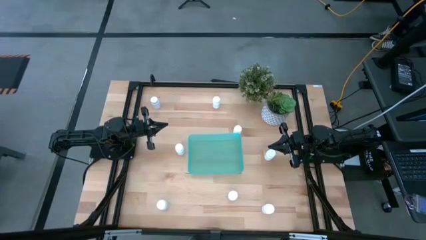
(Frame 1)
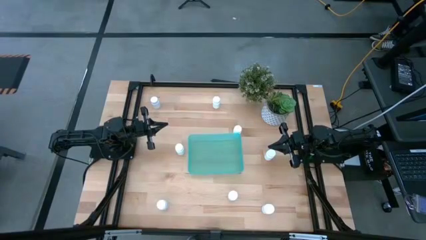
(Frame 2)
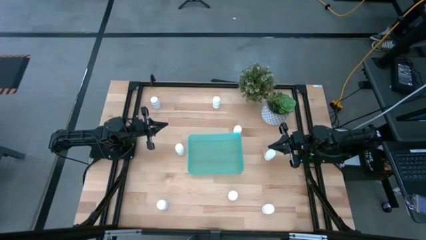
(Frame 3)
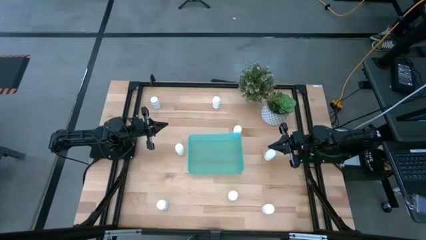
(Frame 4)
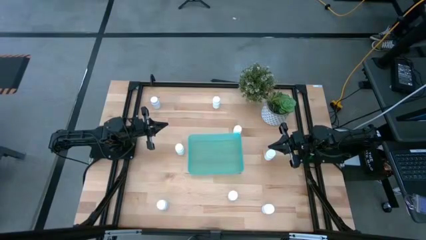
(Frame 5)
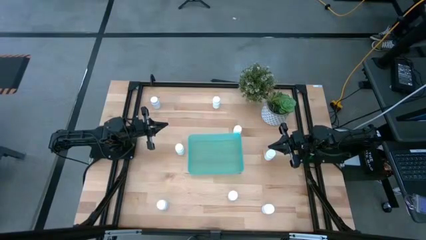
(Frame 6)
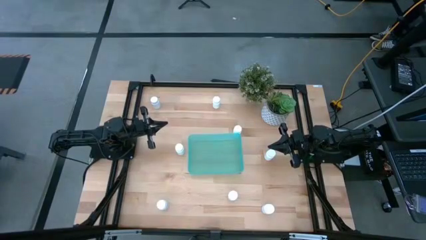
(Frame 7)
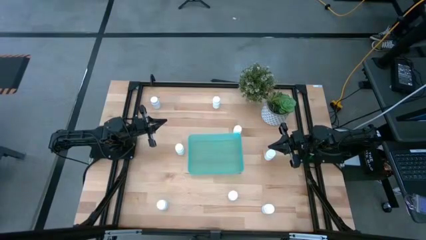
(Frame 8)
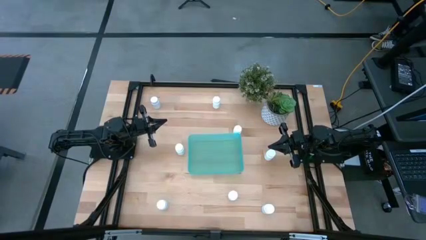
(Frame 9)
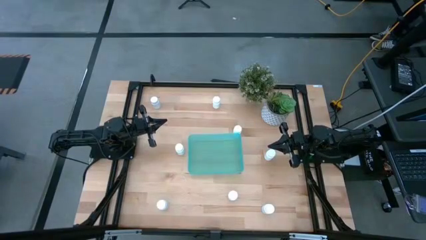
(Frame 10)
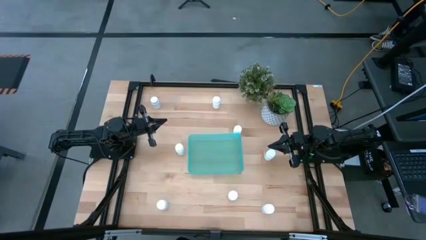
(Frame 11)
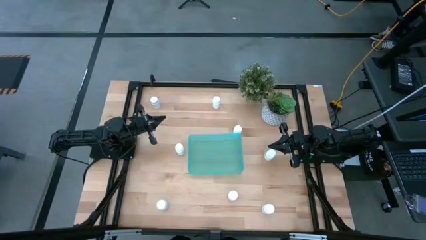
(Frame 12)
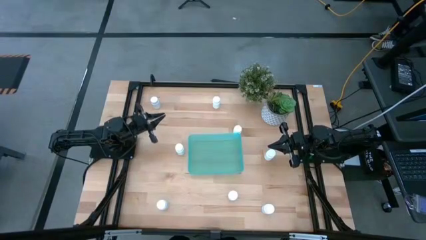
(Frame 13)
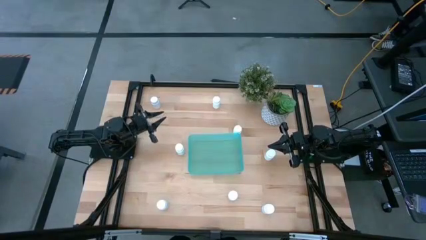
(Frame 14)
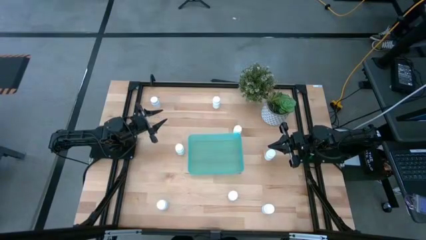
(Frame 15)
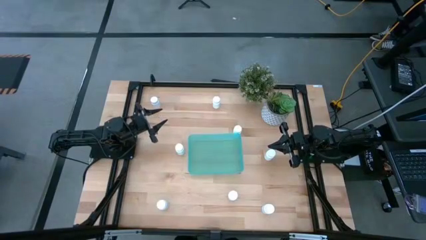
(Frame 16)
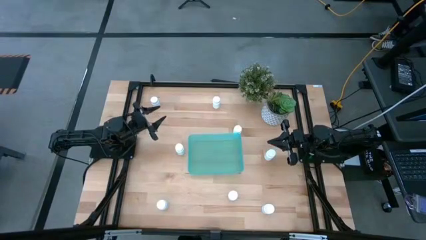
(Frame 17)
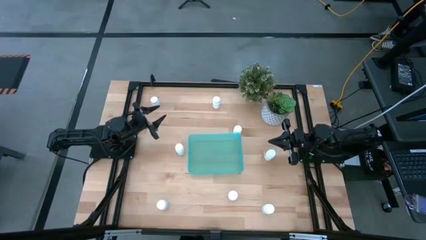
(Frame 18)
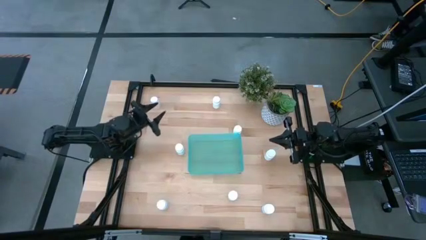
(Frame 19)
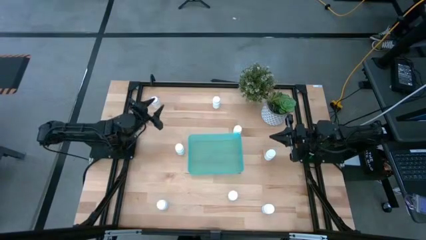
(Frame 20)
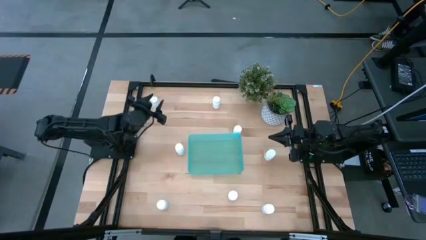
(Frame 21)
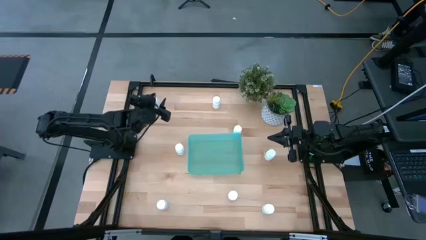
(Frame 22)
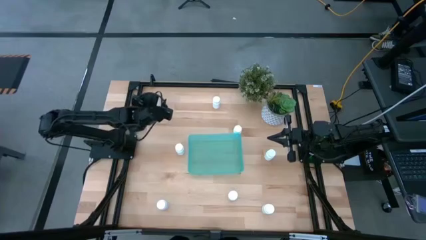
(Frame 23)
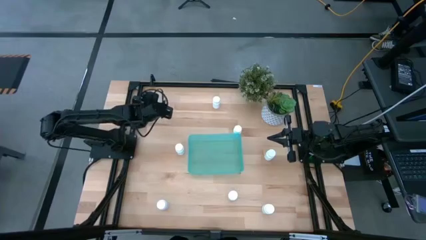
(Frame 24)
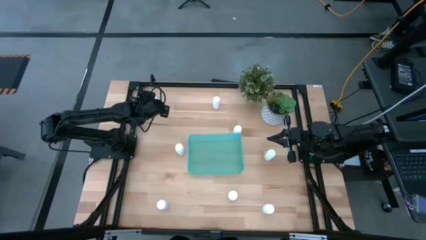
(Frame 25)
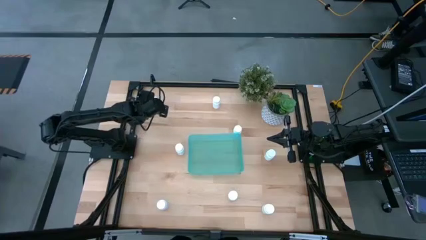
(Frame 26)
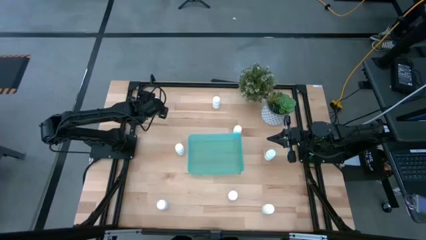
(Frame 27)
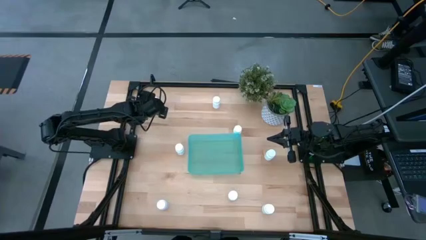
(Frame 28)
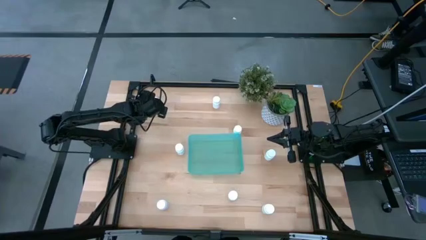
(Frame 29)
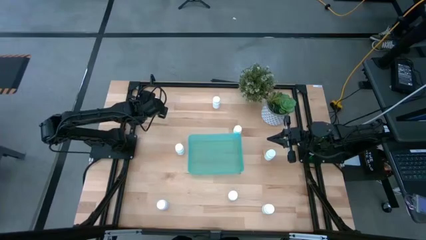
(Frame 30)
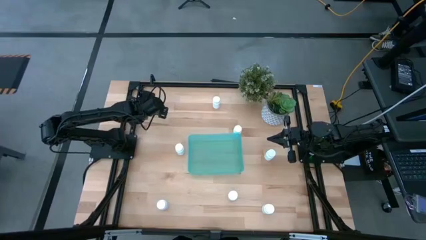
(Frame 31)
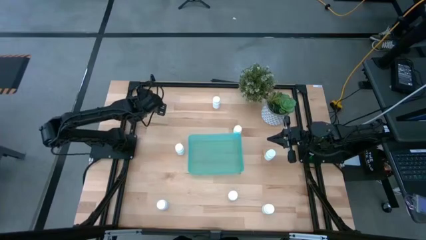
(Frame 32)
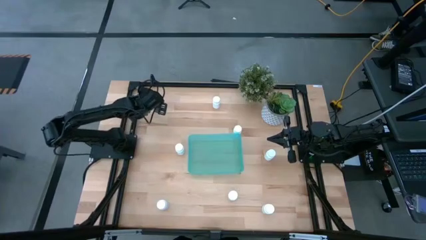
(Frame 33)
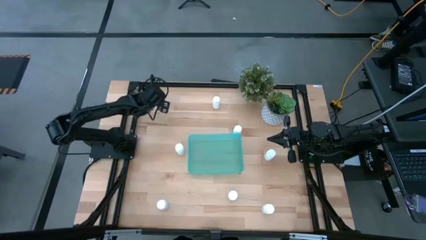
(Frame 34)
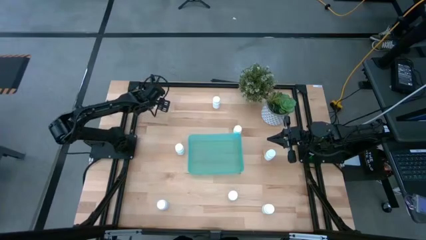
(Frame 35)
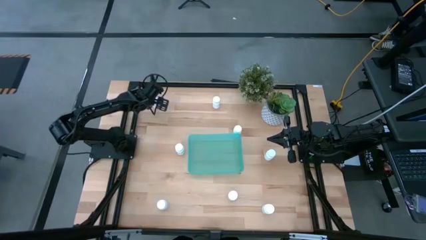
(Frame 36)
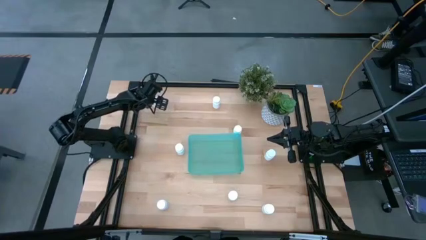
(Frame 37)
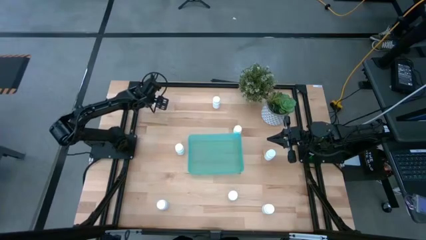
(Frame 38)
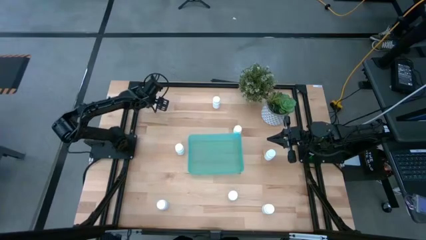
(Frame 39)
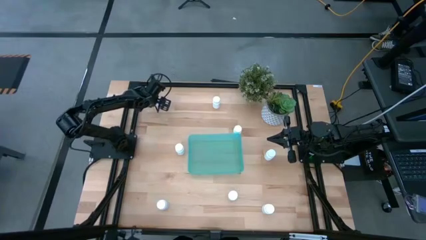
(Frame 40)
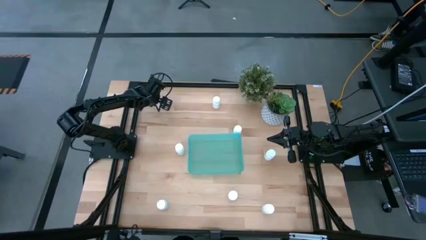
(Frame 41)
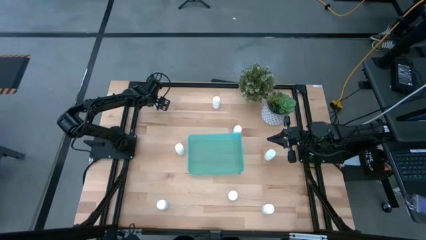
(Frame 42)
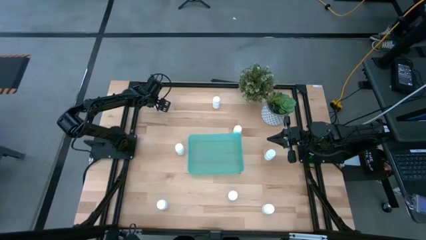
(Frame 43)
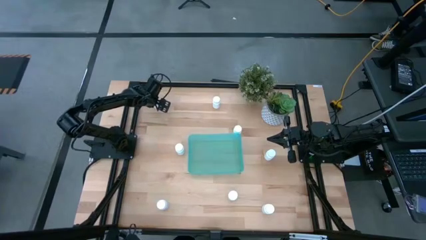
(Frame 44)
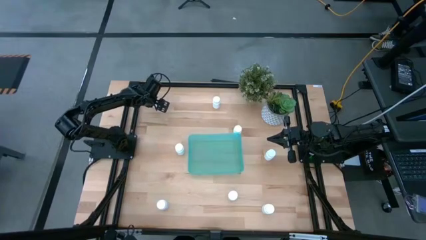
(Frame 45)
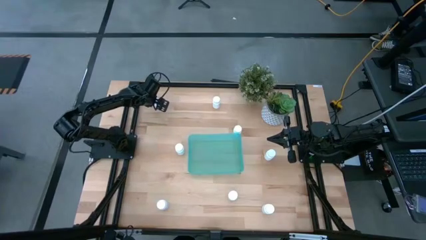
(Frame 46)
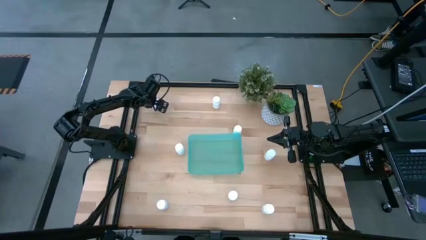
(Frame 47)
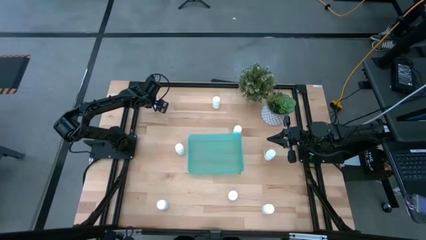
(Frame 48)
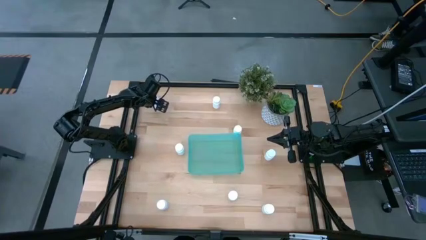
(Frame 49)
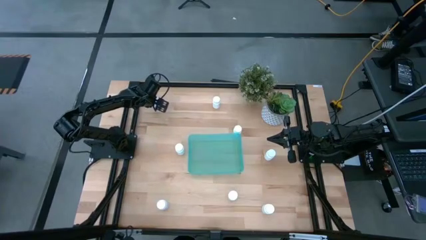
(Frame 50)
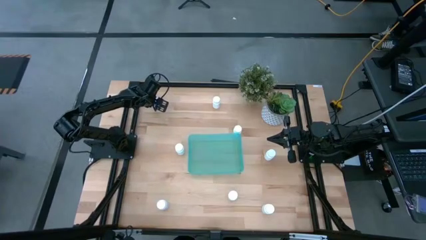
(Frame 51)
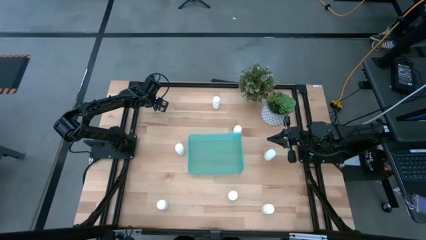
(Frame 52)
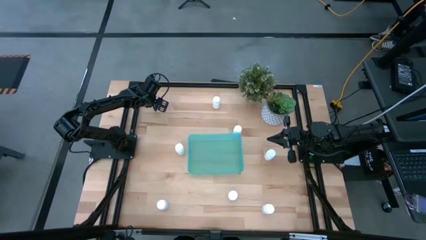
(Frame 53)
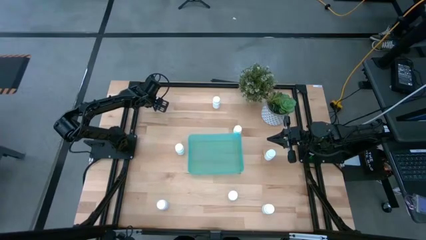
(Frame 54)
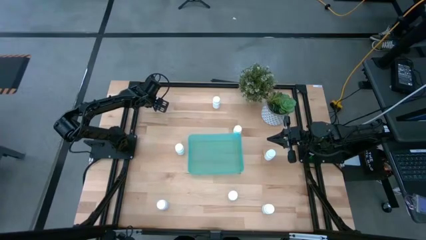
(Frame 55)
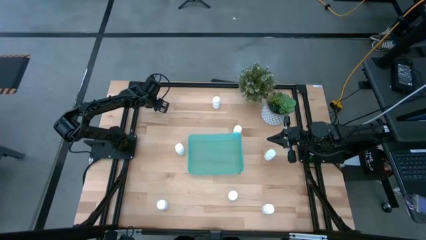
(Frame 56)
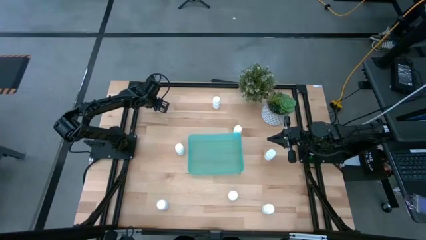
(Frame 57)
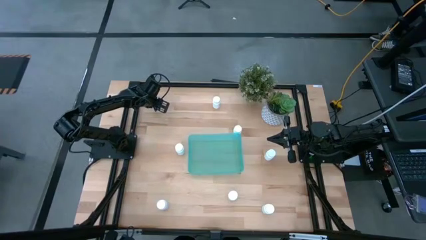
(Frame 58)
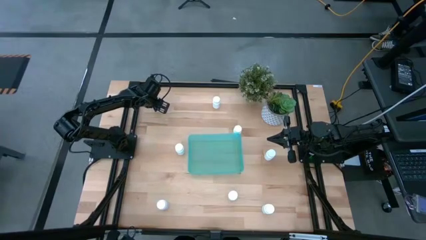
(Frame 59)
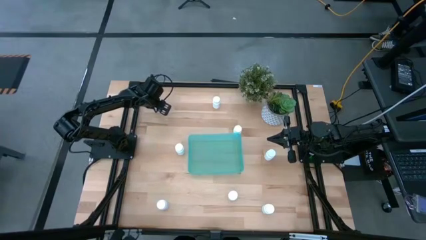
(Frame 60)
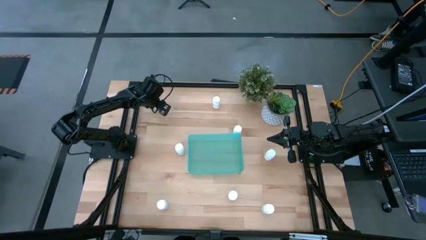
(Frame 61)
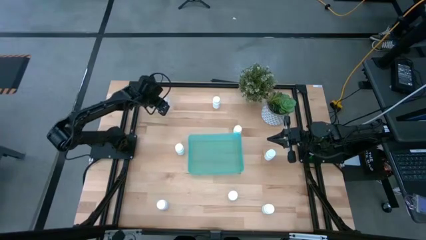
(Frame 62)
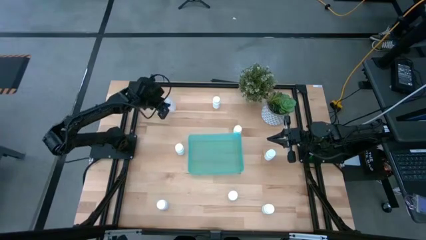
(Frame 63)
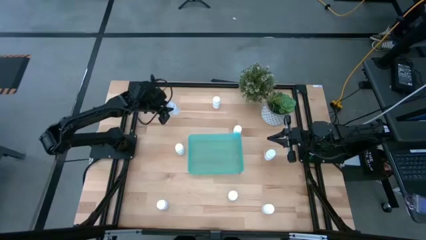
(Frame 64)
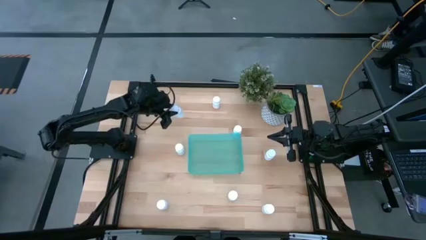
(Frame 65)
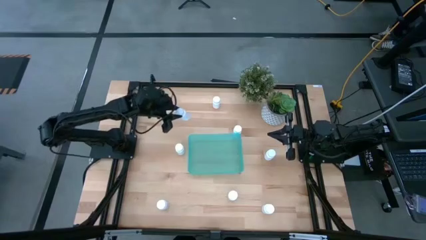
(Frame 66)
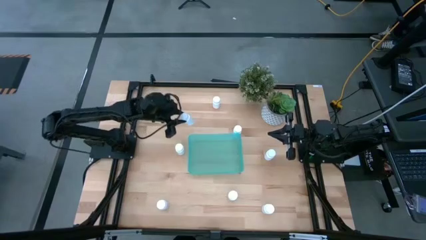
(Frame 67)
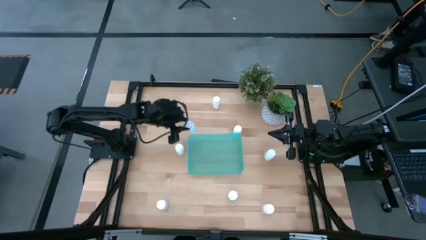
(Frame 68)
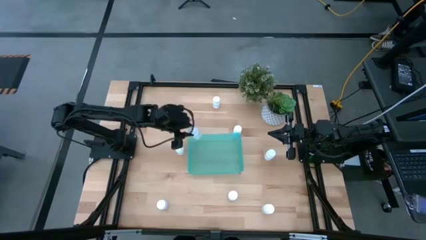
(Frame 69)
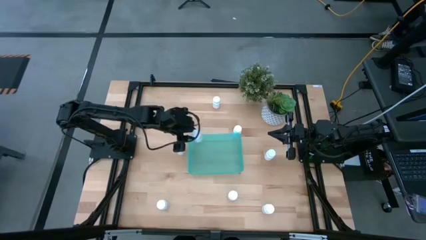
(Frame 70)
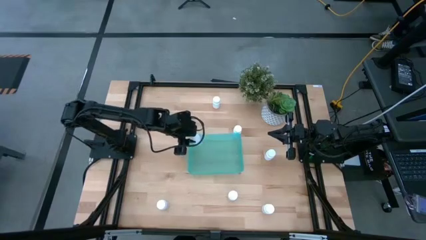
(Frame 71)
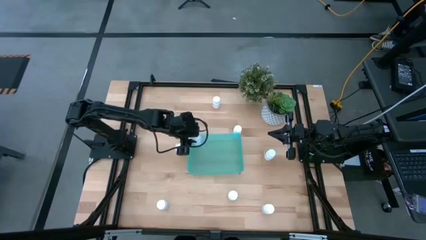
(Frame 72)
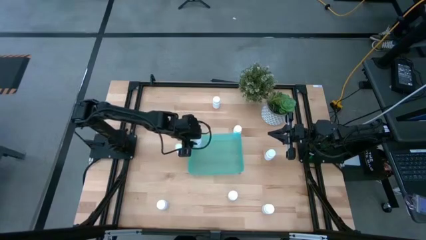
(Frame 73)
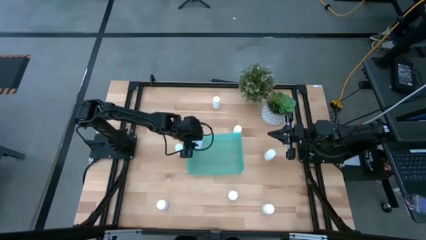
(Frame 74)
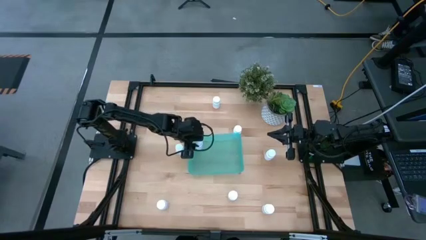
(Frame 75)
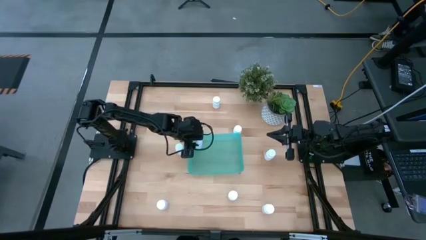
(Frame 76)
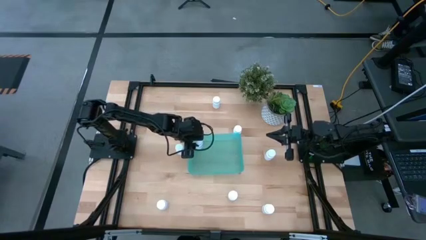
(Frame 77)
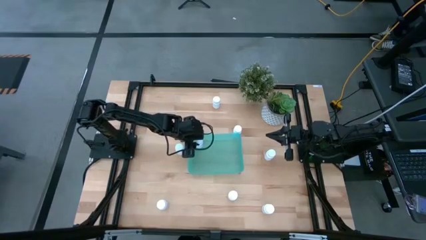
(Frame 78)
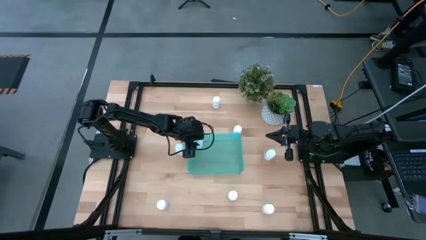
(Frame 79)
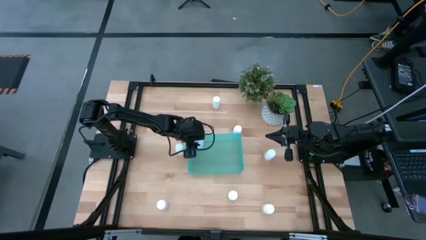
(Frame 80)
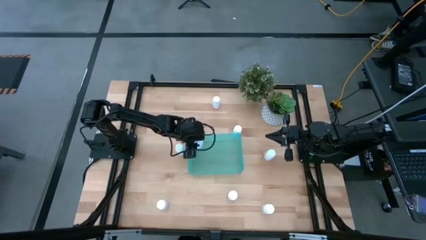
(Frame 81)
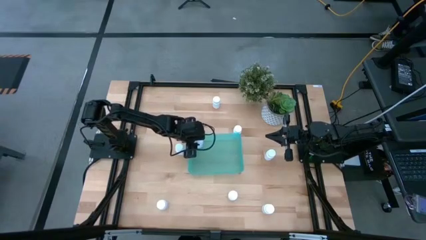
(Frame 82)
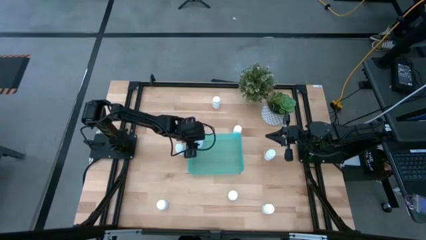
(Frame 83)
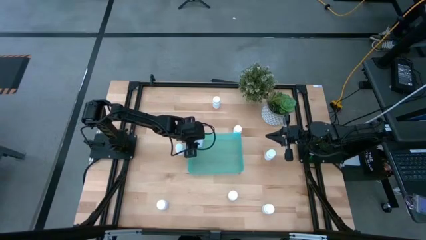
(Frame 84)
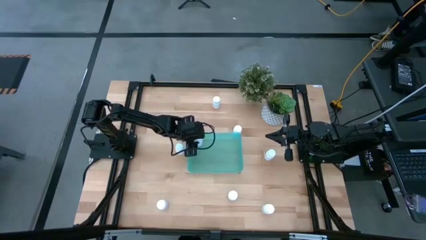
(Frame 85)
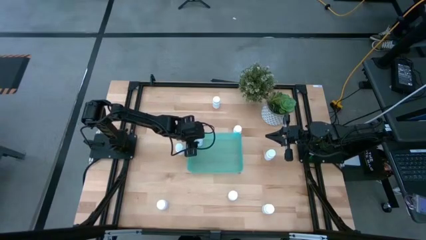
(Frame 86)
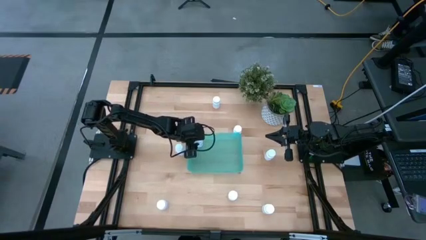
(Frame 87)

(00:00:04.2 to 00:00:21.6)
Task: Pick and place pill bottles into a basket
Put the white pill bottle into the blue bin
